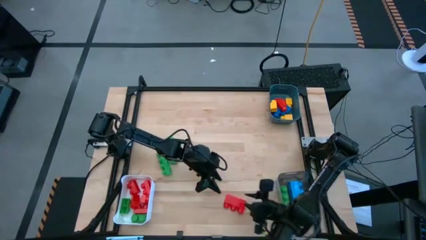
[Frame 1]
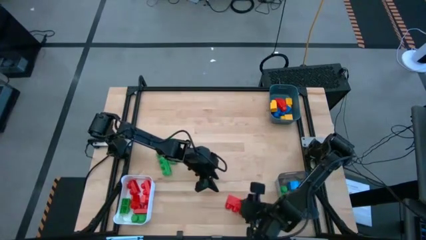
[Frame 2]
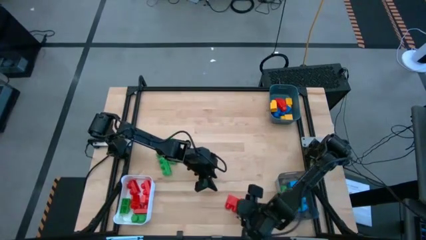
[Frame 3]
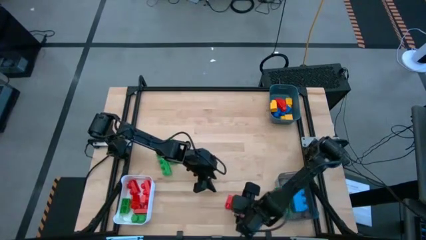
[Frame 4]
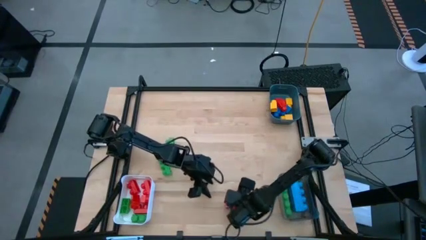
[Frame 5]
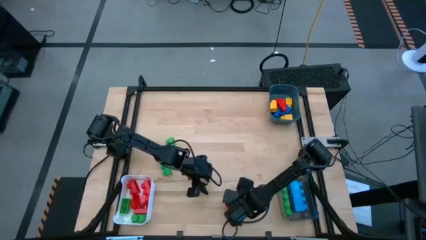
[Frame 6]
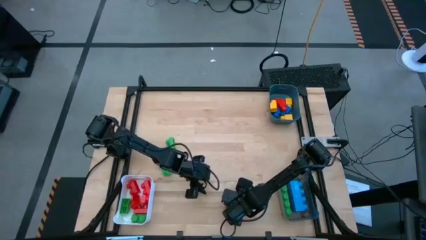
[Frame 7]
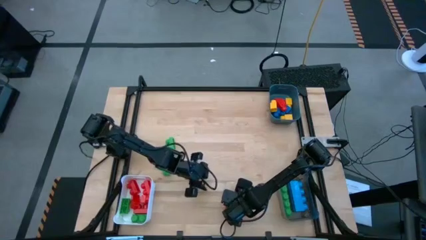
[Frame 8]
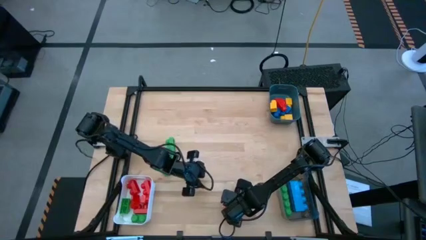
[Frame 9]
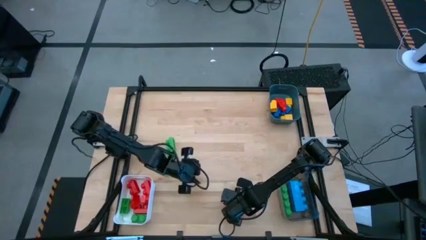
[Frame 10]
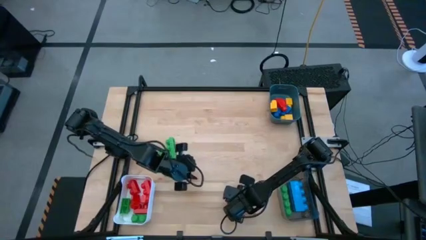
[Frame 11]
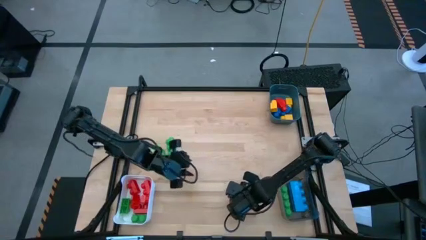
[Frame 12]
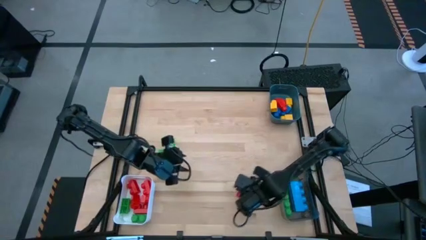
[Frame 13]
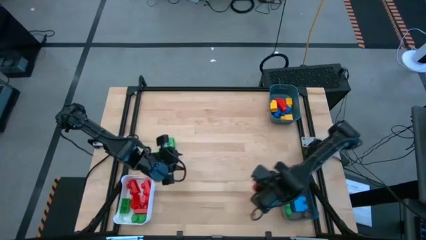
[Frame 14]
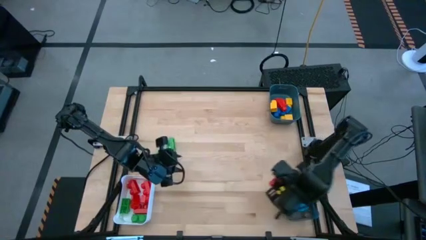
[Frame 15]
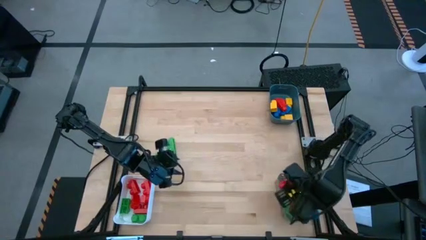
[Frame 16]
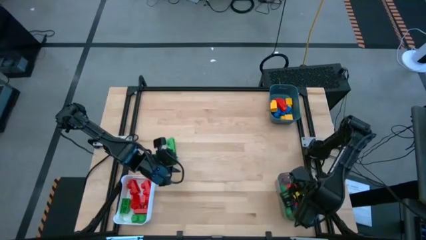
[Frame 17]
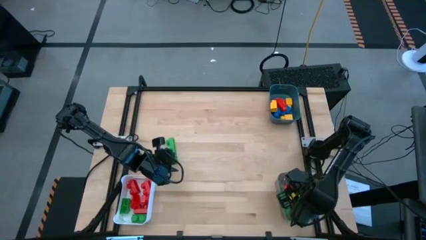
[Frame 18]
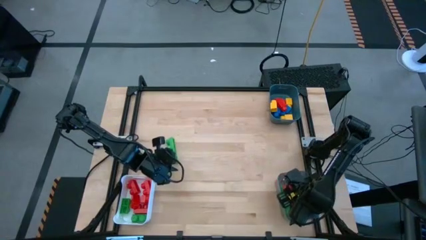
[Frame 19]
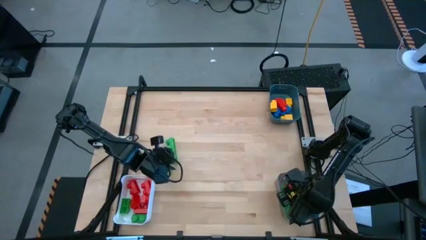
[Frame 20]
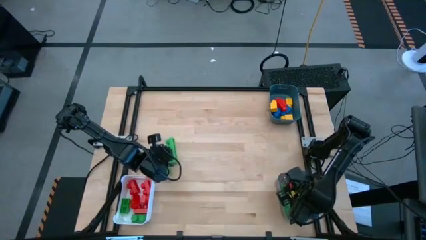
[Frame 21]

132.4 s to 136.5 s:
Task: Sort blocks by size
Put the three stud red game piece into the transparent black bin

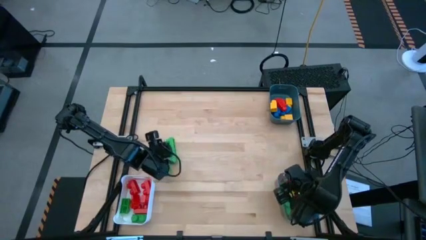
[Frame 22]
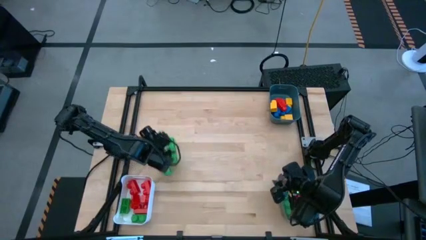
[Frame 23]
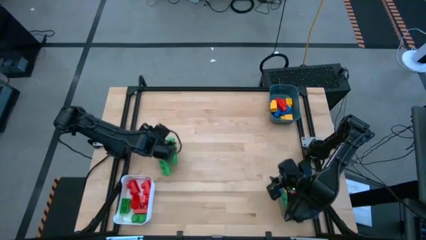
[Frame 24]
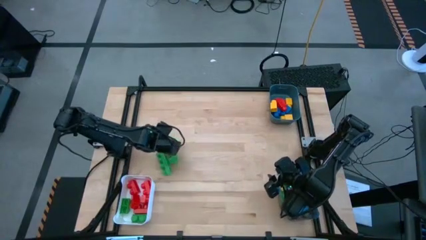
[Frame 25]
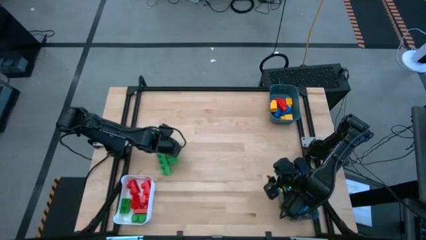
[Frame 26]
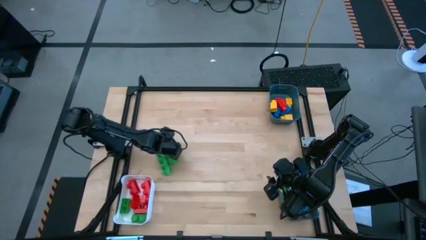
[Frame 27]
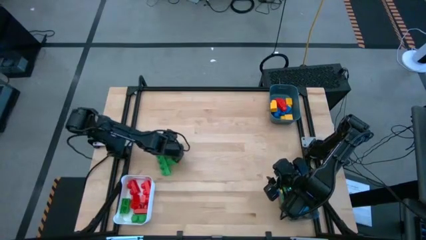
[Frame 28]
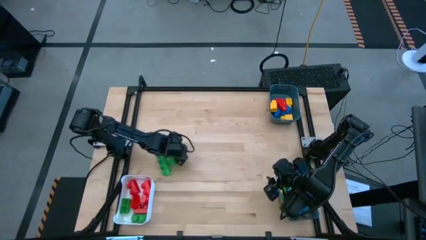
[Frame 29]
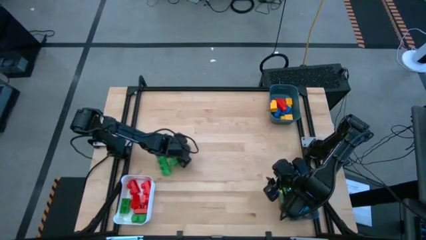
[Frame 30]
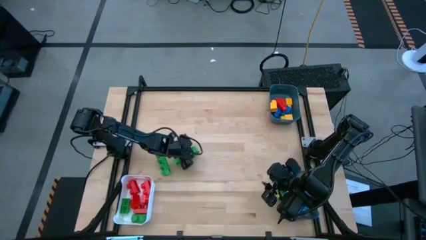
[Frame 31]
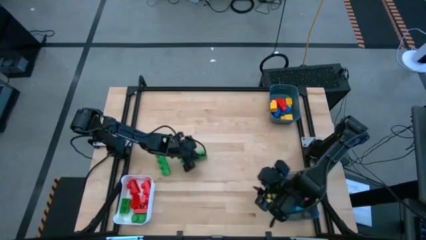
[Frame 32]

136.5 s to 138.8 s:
Put the four stud green game piece into the transparent black bin

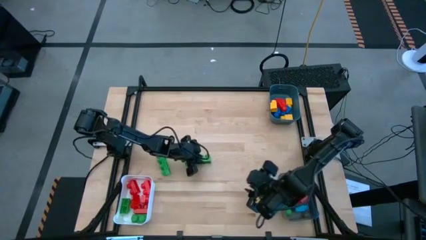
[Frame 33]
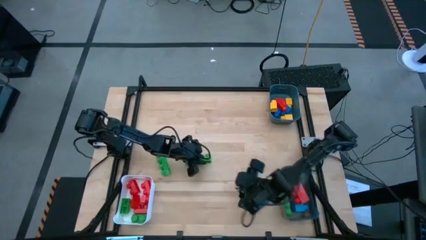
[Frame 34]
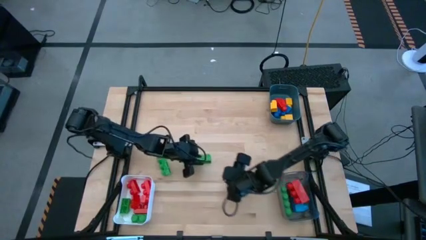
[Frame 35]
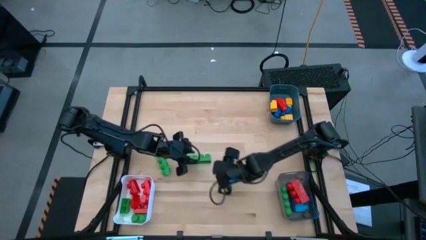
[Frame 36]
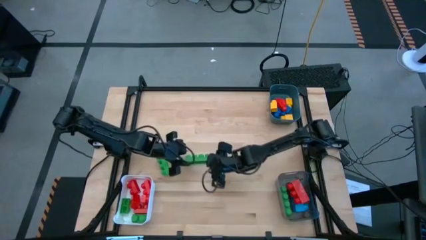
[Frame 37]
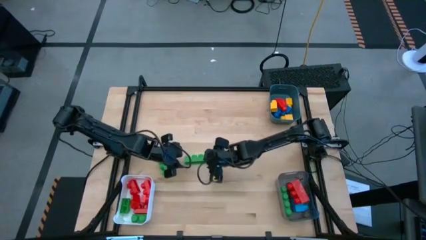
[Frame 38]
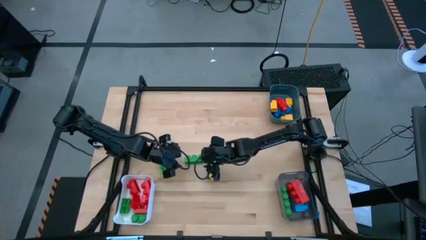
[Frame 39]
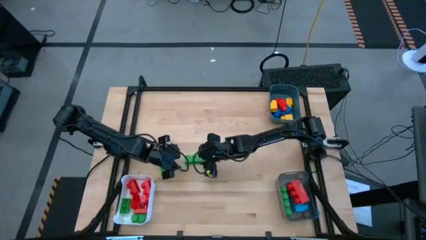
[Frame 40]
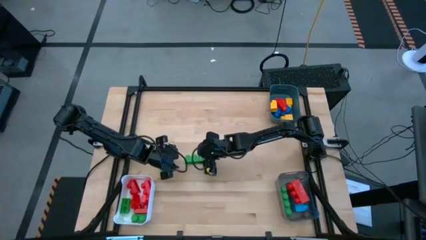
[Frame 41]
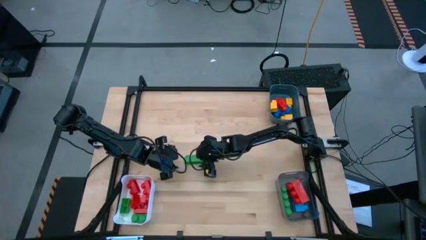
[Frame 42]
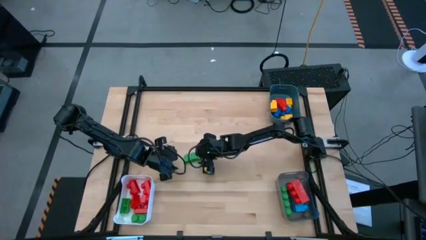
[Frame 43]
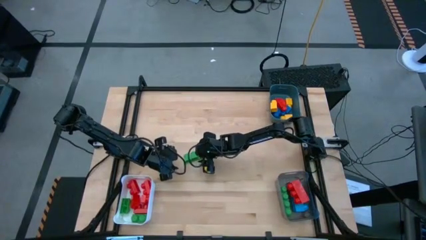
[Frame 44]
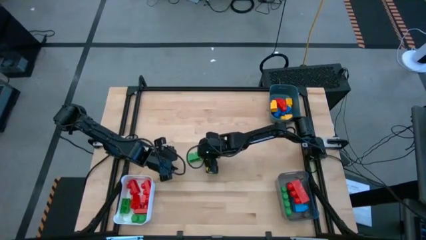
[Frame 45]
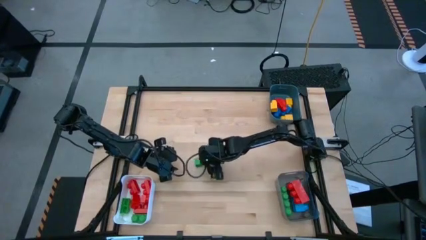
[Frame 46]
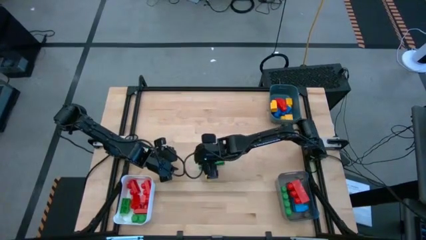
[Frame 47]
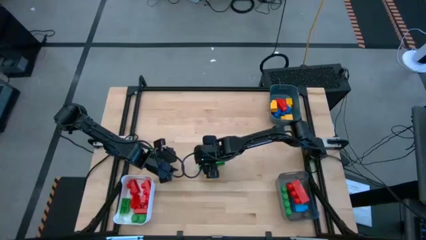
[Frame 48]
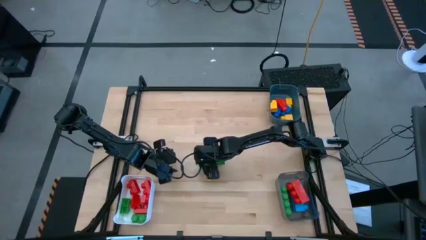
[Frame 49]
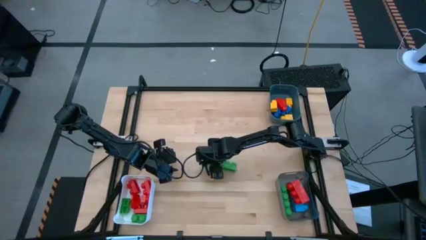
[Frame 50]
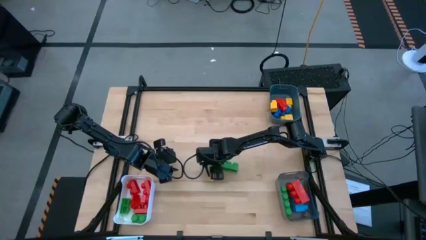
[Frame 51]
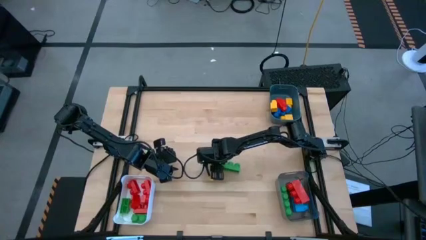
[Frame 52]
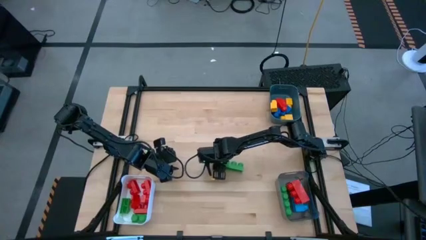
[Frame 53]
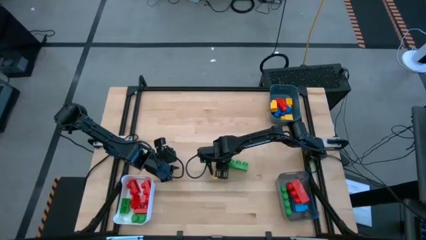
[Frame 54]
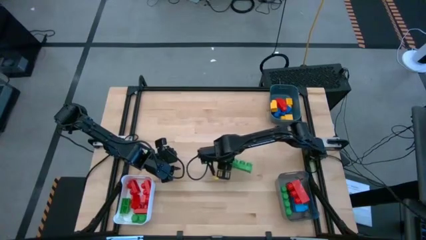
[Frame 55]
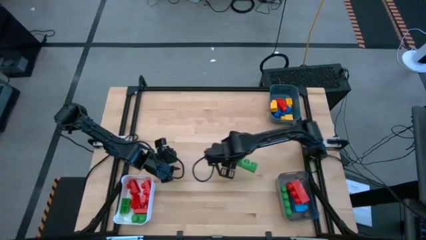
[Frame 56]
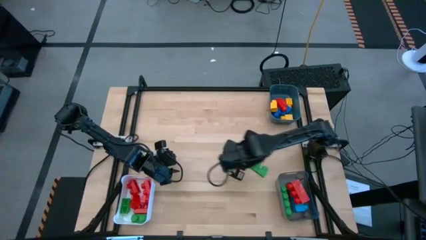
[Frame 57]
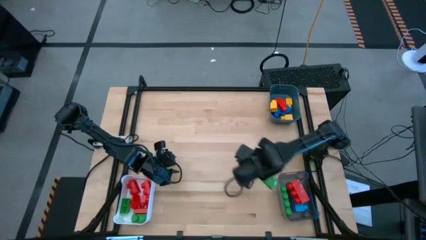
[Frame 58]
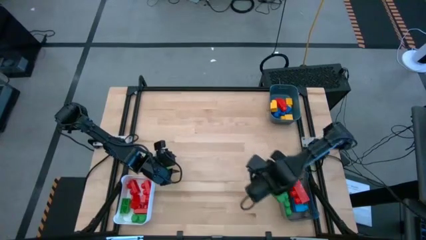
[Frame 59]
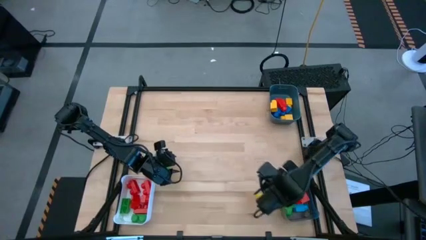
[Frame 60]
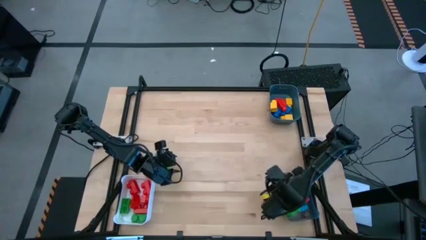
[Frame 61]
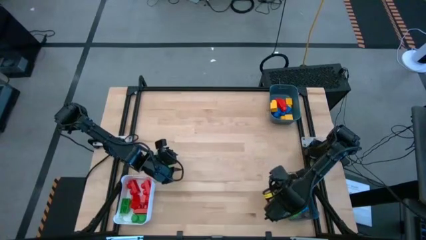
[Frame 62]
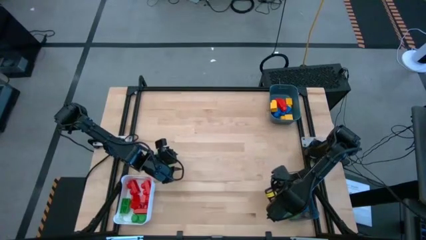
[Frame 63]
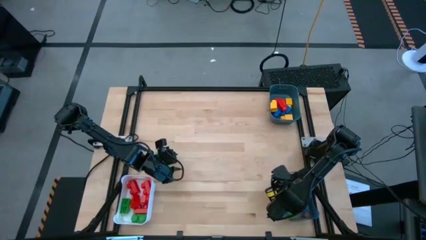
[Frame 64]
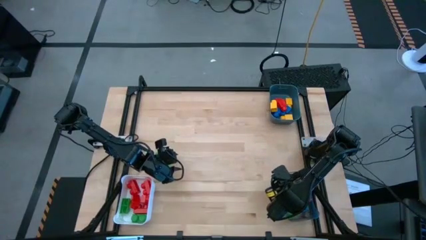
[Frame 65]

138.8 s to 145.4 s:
Put the four stud green game piece into the transparent black bin

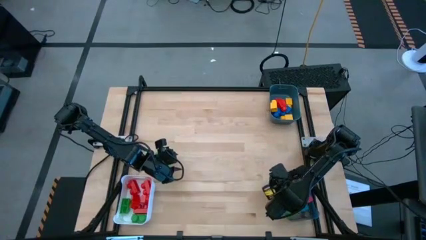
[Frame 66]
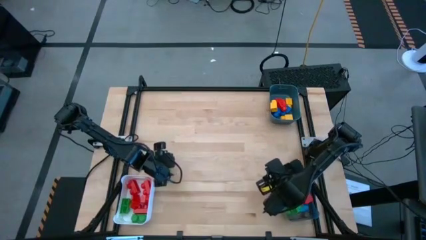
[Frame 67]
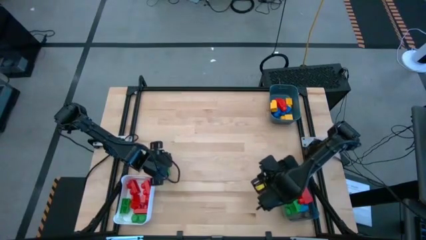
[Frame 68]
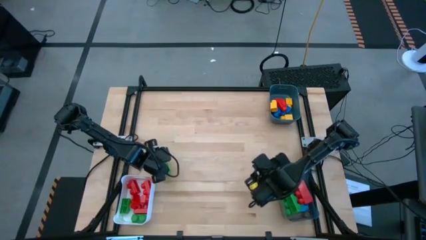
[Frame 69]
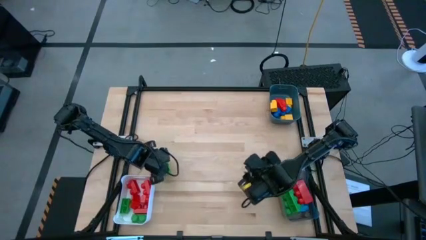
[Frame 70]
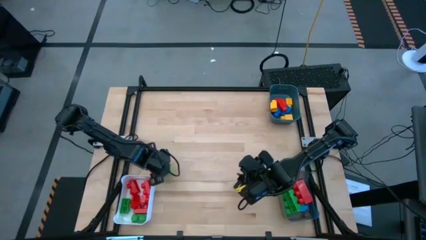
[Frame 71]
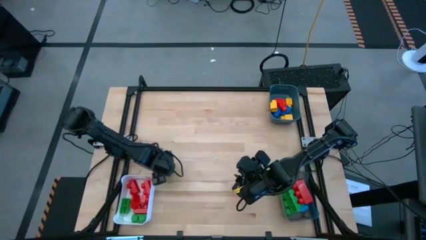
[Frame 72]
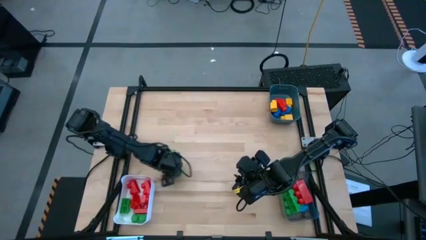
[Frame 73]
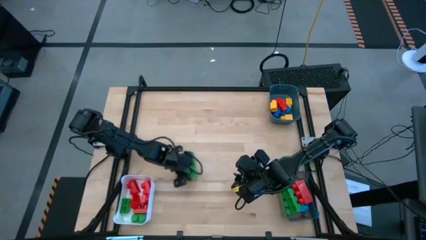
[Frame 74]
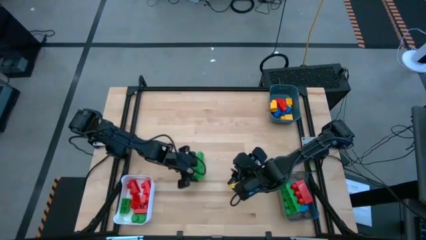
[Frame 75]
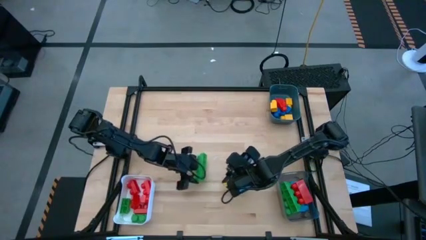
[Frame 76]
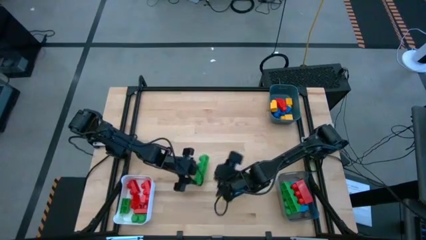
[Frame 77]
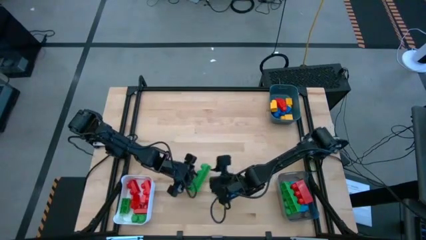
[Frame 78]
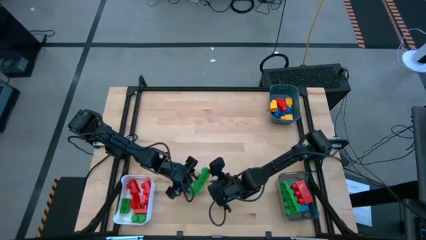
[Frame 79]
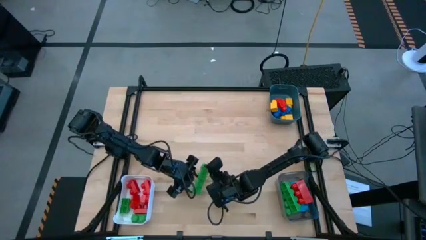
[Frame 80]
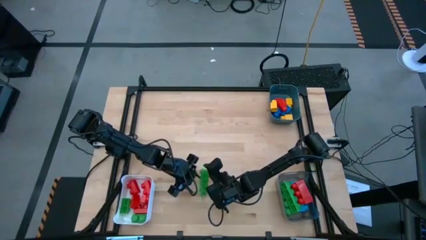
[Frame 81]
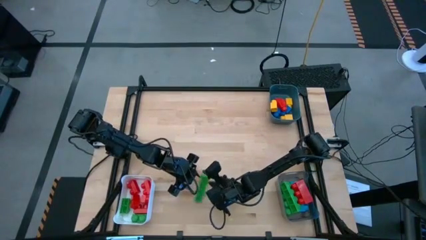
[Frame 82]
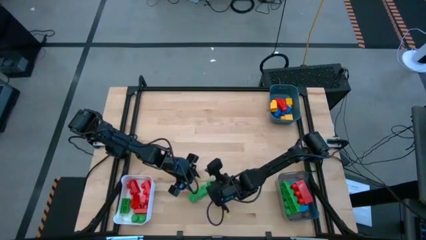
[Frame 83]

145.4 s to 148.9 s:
Put the four stud green game piece into the transparent black bin
